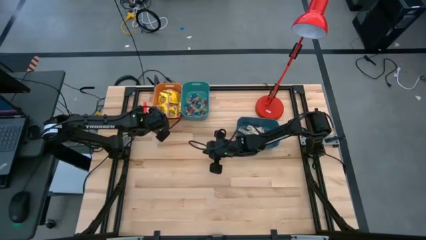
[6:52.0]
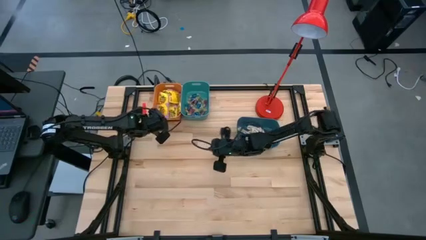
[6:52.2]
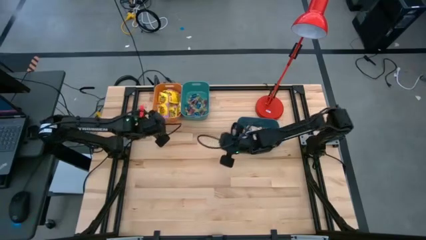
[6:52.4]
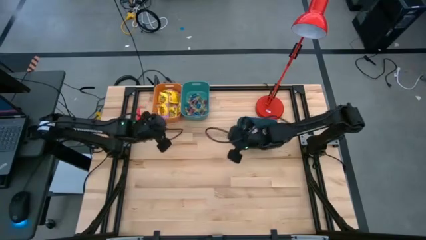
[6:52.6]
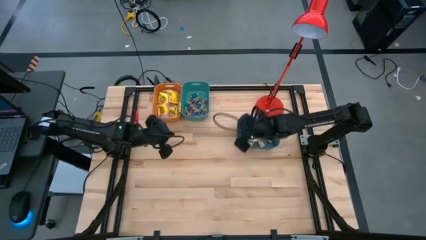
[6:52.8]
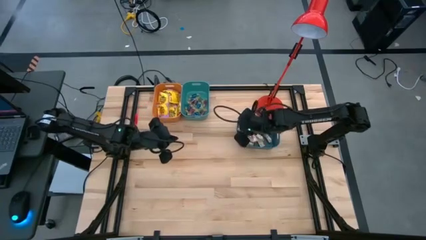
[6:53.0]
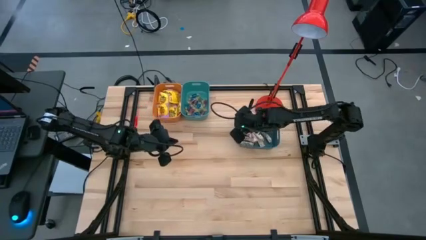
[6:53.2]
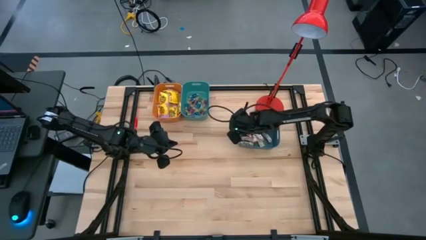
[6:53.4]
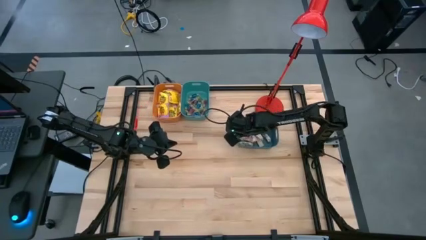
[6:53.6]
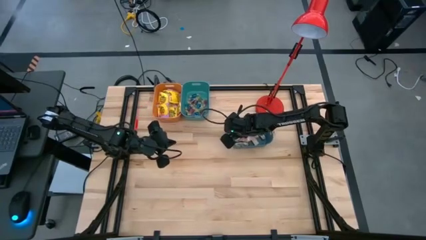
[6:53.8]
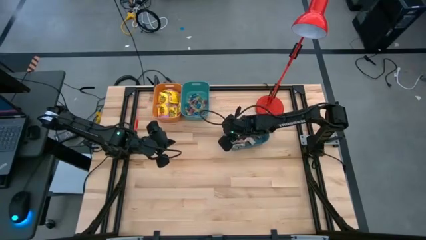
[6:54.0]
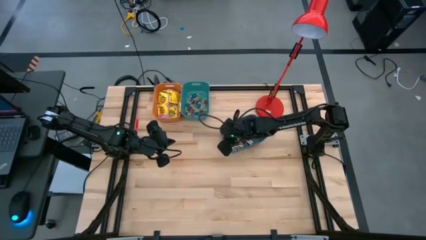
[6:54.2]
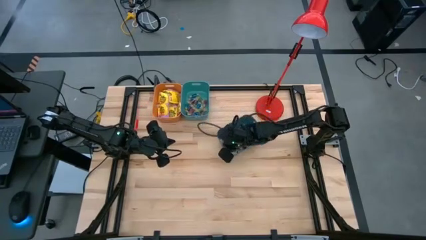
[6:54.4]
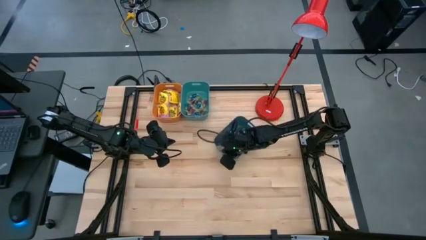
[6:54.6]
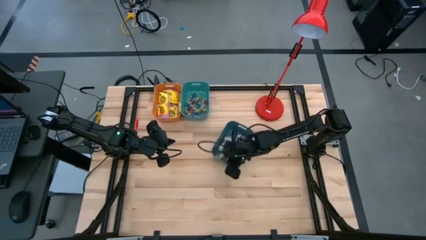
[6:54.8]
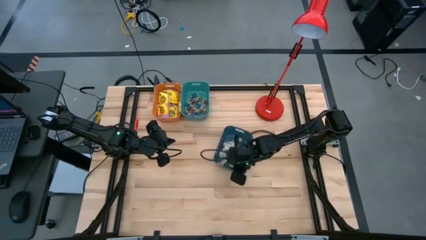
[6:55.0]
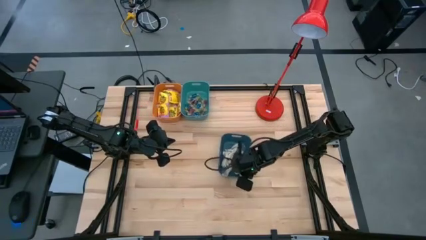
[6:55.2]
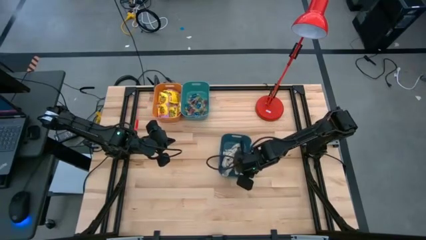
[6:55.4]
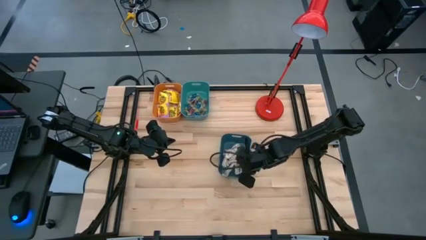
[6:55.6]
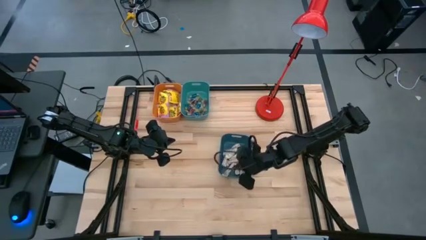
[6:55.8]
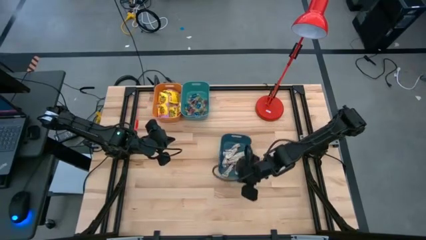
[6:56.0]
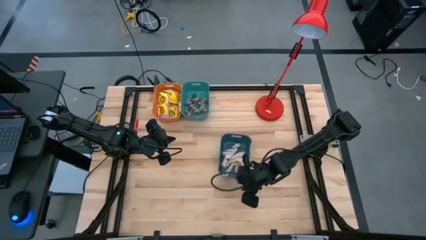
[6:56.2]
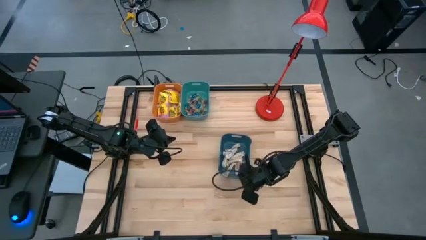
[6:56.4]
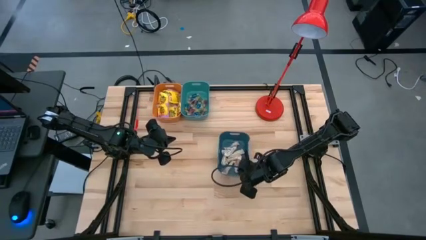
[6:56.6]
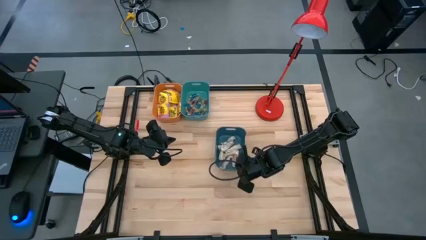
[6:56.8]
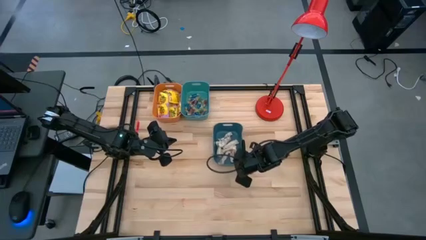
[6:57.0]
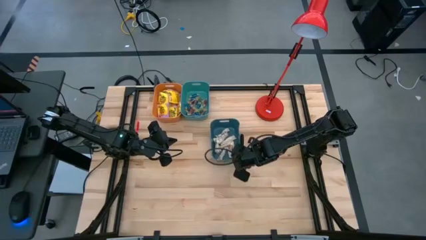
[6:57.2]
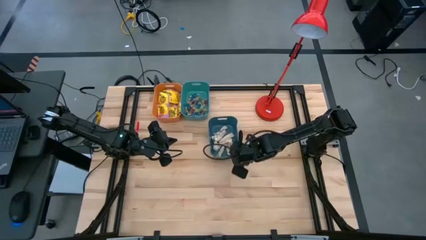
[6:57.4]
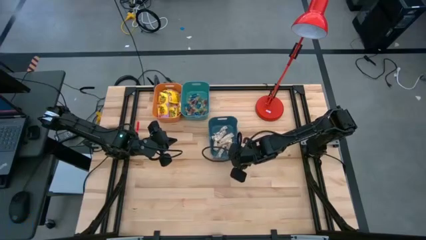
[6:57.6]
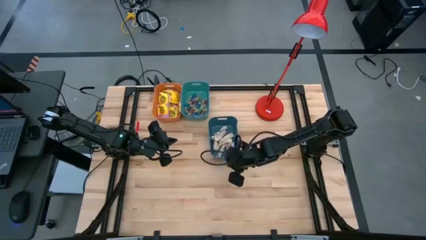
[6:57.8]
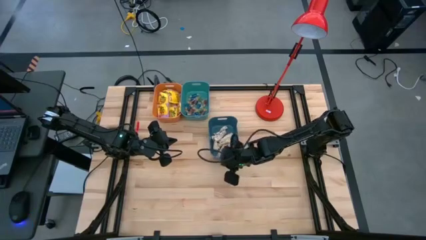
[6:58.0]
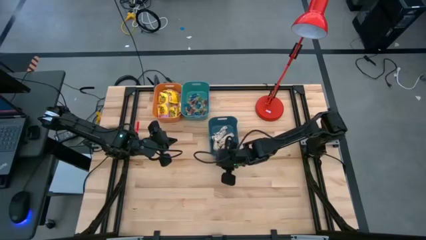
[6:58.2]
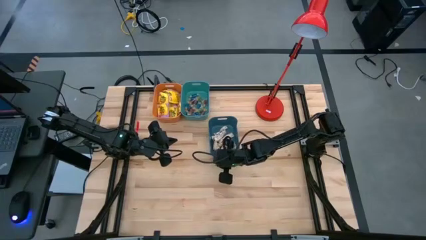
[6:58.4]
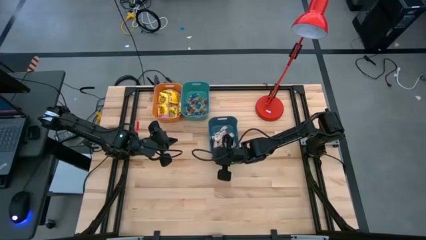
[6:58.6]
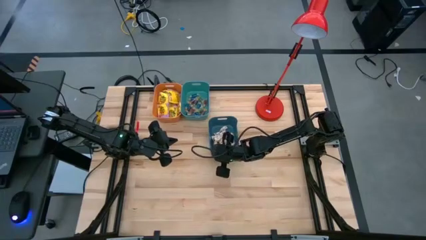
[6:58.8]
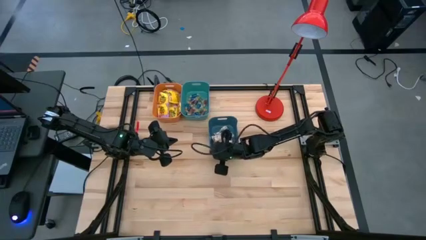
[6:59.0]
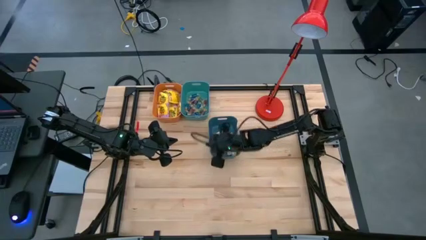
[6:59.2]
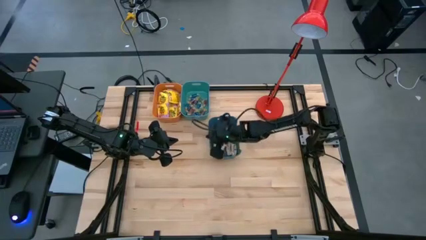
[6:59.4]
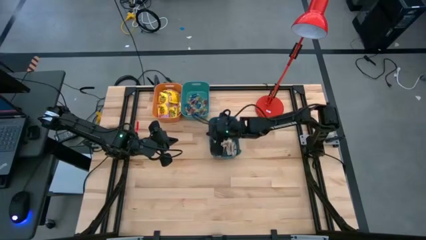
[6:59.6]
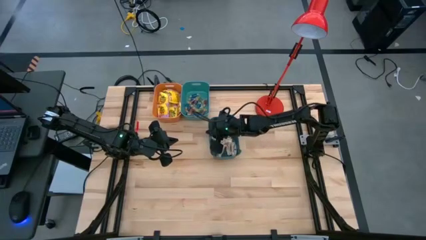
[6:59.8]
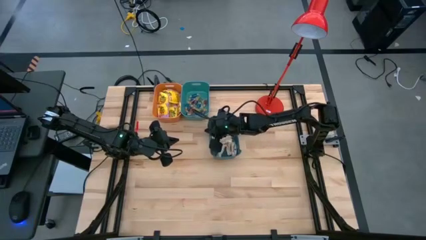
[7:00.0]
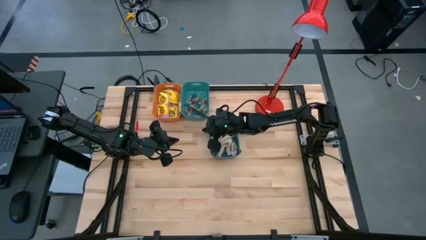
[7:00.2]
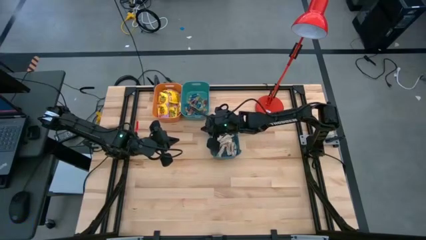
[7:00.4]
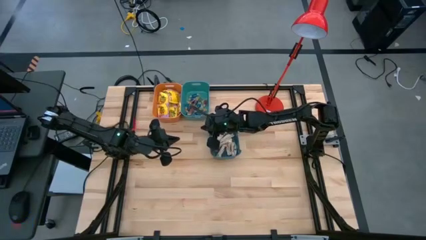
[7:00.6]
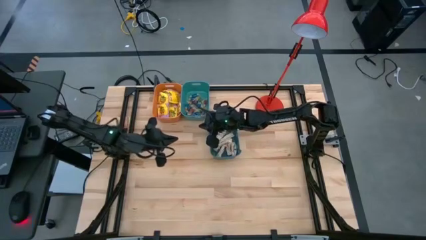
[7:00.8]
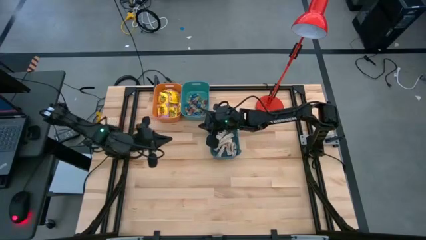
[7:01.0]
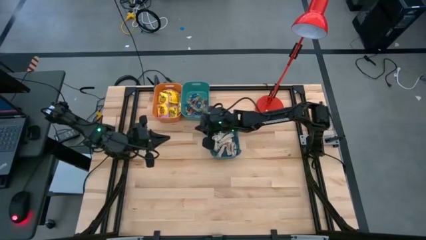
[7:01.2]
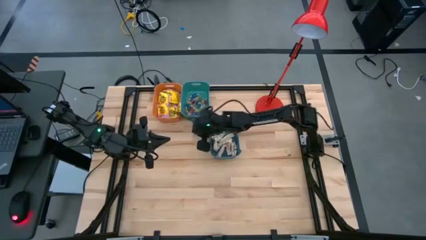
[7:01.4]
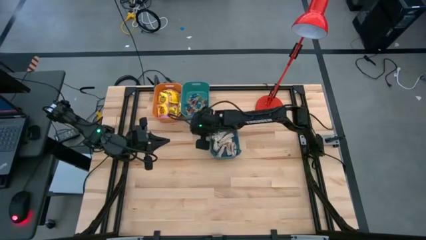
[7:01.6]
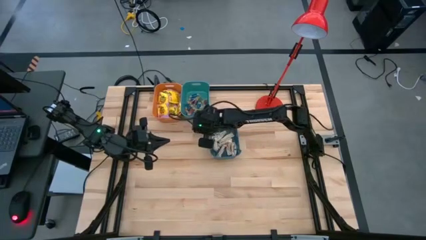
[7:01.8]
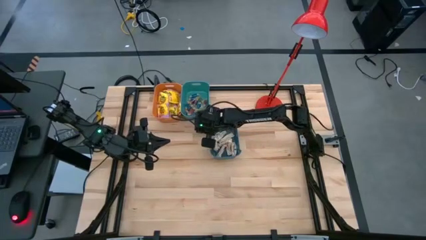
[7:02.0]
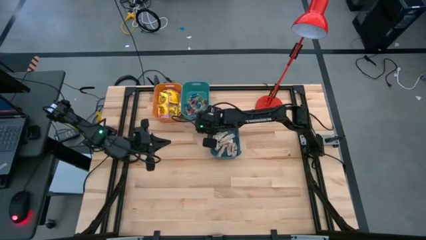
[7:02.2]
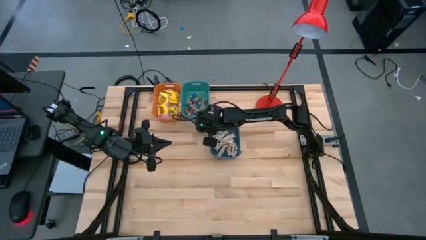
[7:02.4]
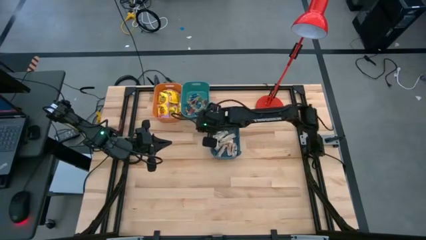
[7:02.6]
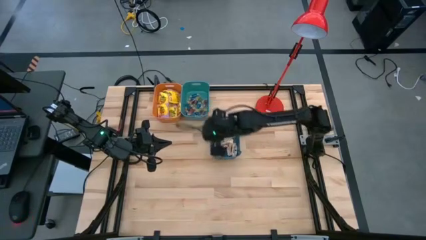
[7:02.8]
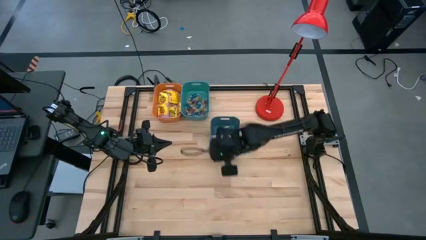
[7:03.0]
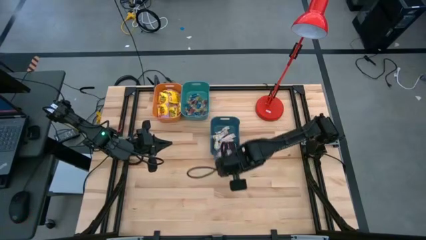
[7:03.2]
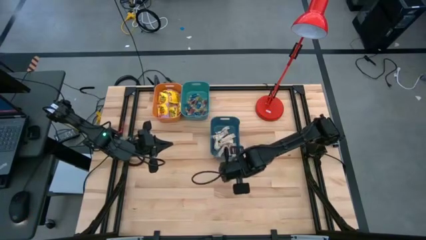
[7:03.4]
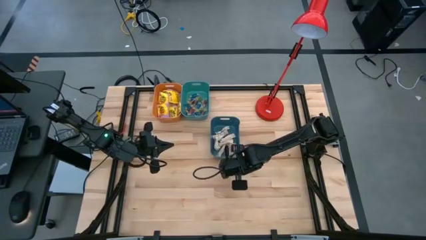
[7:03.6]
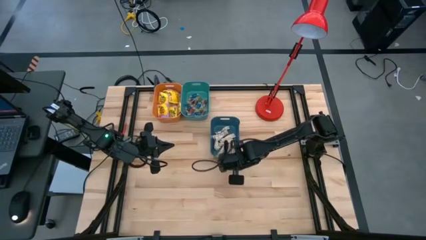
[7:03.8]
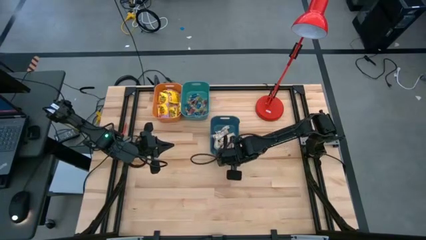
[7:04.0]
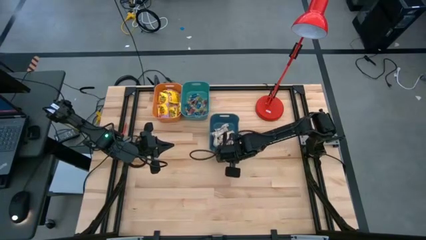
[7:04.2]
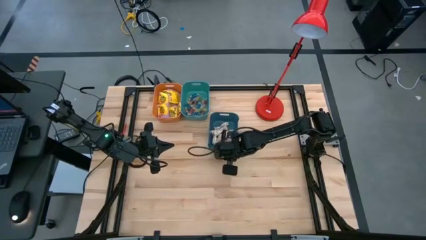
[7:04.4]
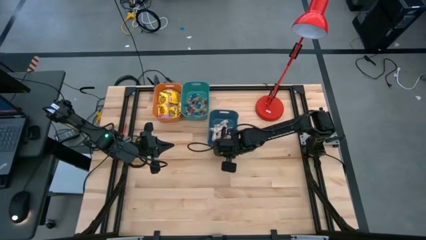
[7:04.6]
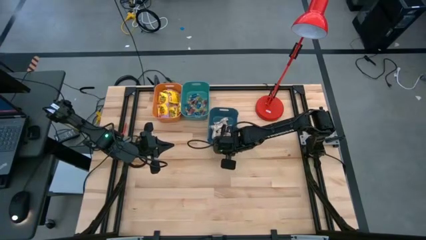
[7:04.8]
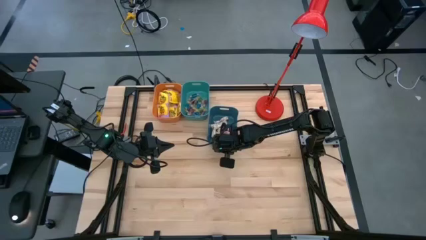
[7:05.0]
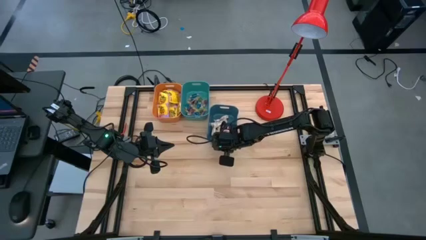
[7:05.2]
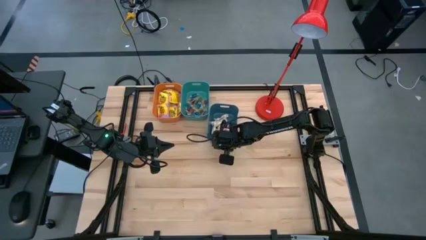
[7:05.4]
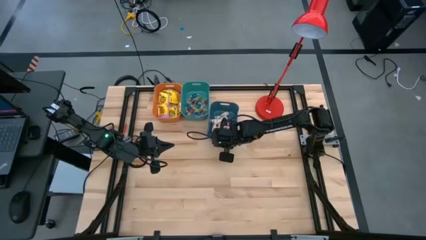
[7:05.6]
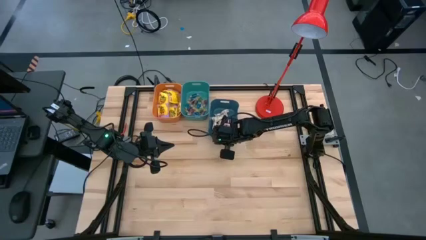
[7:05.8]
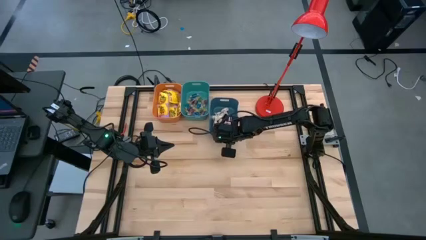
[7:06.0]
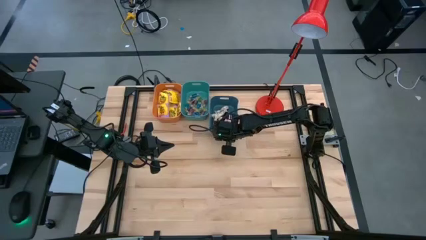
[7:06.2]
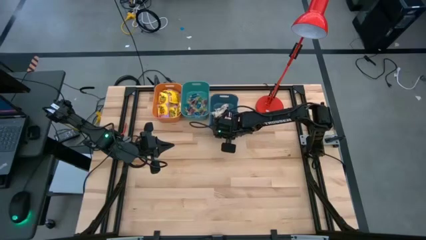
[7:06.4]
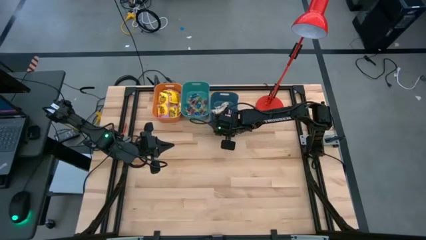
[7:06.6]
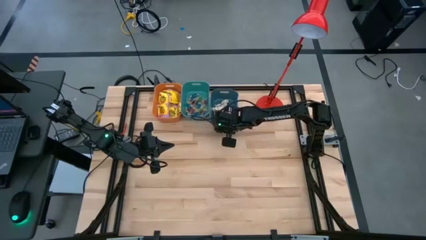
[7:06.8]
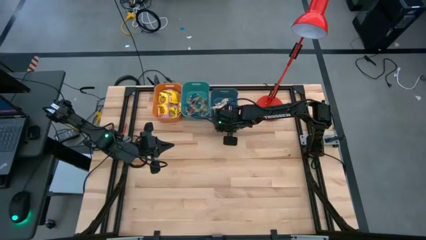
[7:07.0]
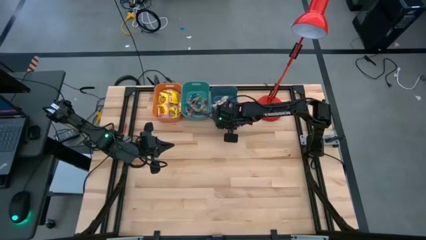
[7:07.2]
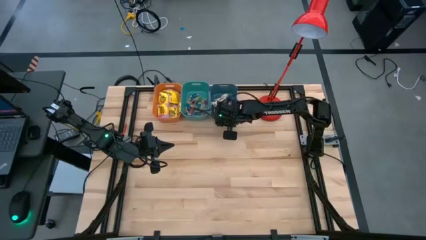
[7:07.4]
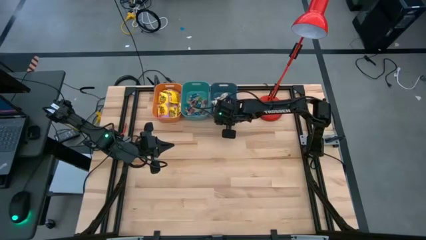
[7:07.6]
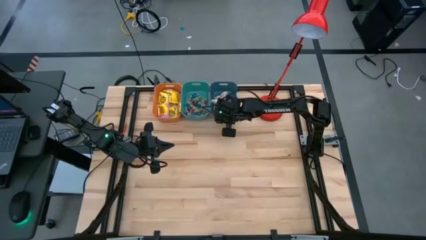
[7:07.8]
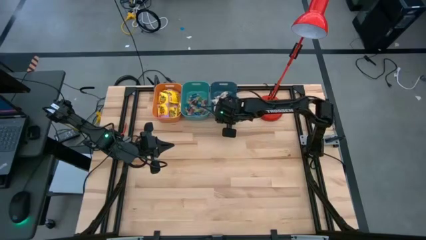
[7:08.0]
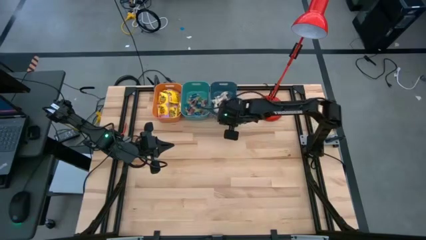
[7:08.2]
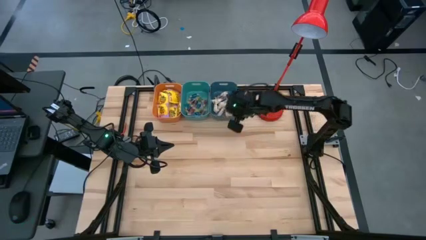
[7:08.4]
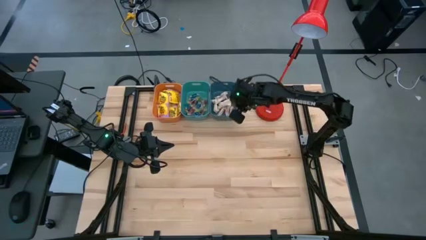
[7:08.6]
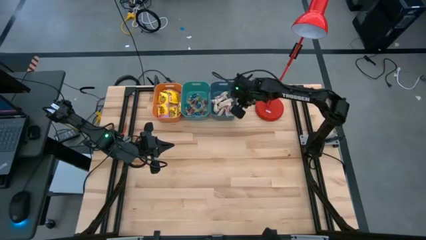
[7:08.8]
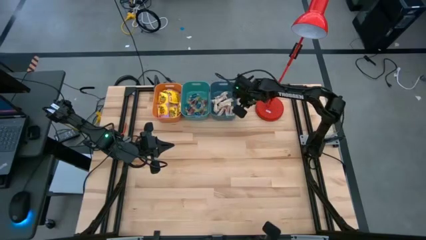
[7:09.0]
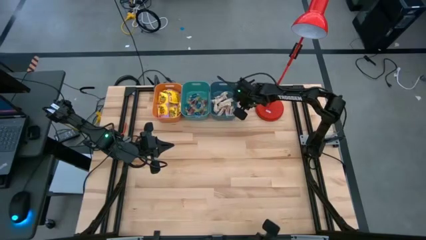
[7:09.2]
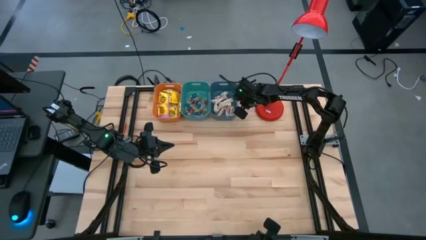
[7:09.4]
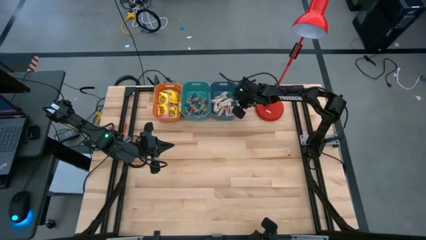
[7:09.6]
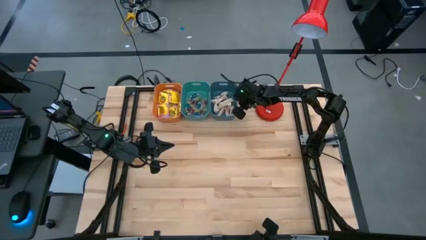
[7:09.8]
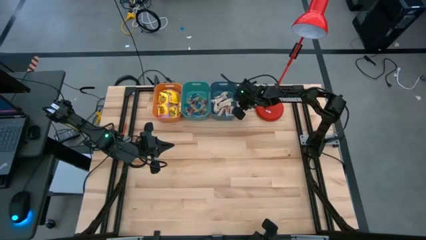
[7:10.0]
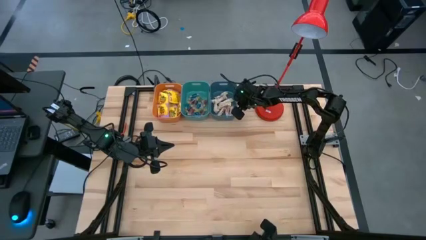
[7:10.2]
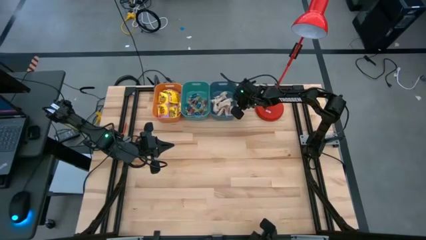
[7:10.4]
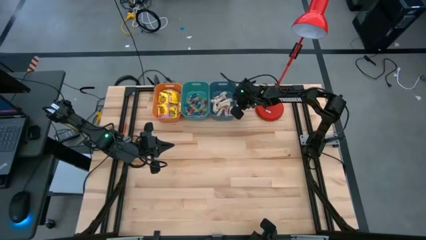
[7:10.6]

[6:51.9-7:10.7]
Task: Sort candy
Move the blue bin to the right side of the green bin
